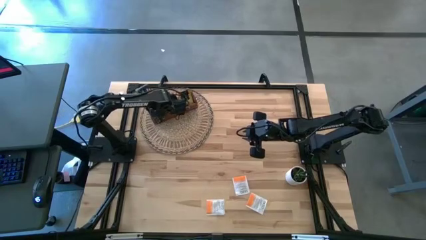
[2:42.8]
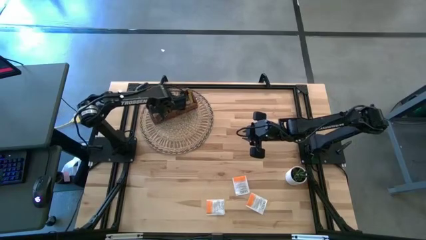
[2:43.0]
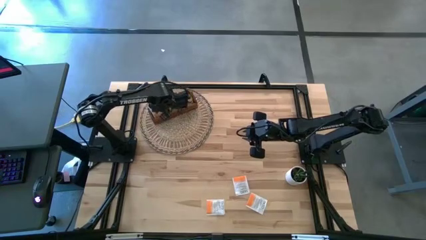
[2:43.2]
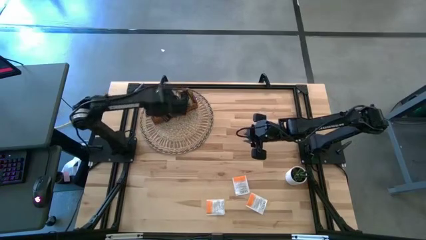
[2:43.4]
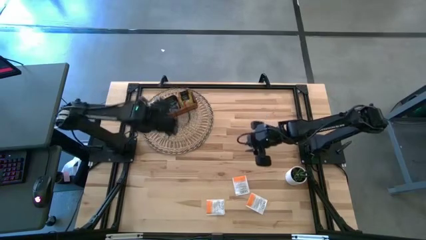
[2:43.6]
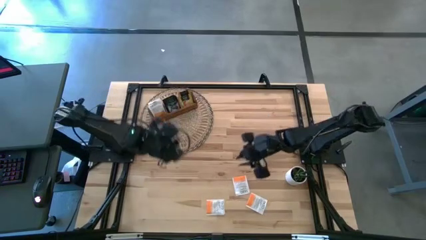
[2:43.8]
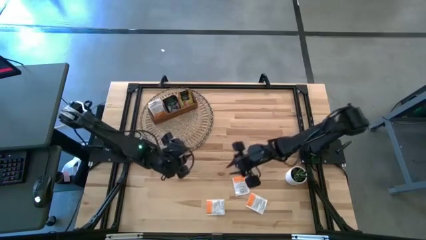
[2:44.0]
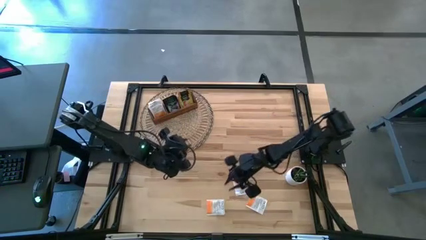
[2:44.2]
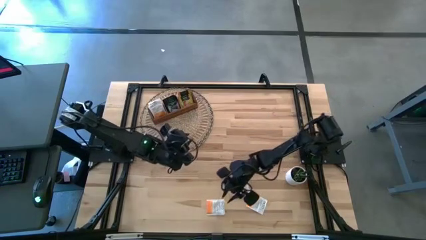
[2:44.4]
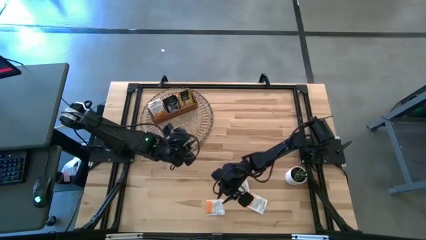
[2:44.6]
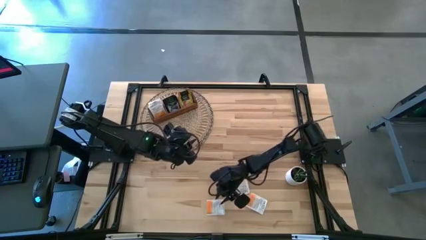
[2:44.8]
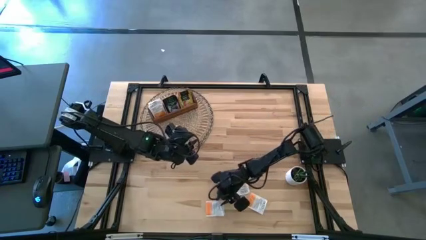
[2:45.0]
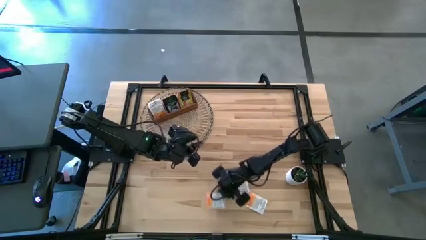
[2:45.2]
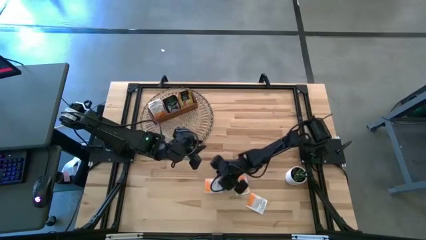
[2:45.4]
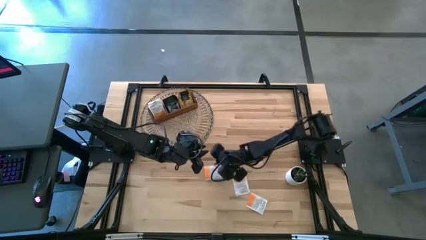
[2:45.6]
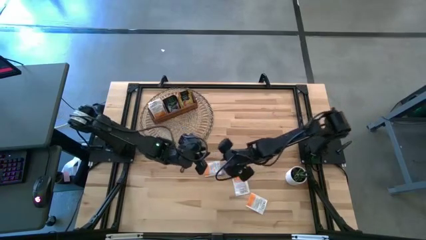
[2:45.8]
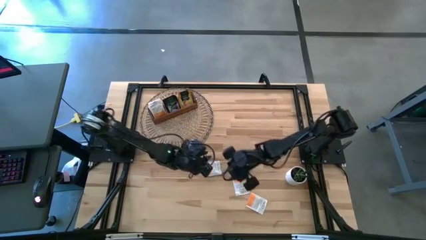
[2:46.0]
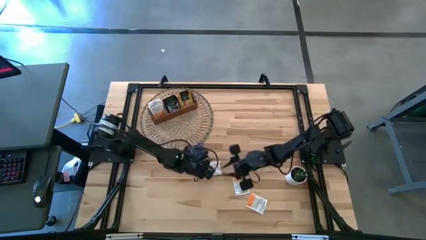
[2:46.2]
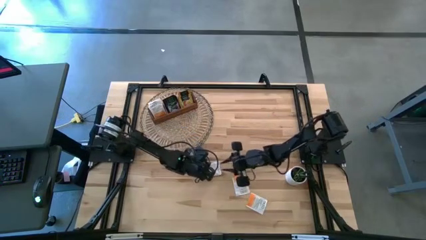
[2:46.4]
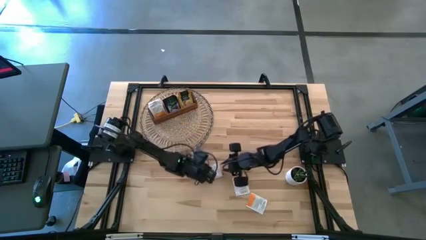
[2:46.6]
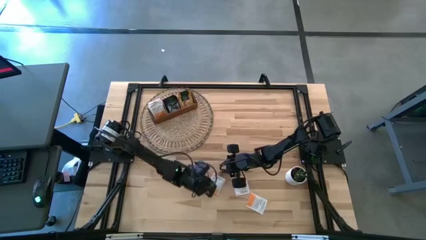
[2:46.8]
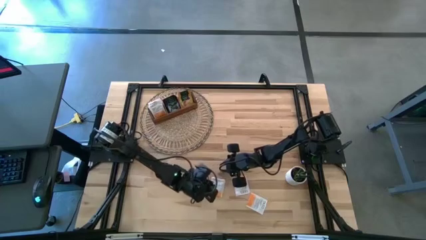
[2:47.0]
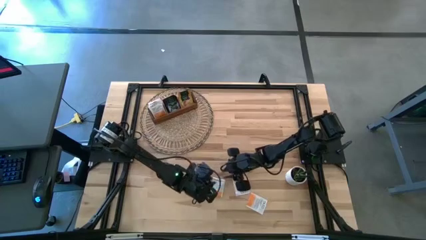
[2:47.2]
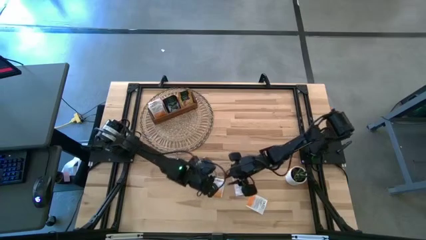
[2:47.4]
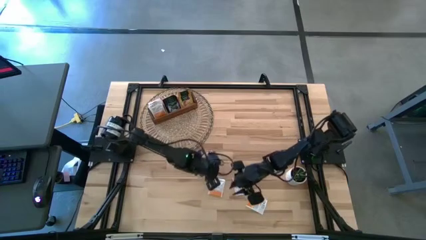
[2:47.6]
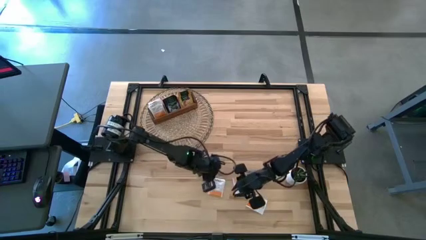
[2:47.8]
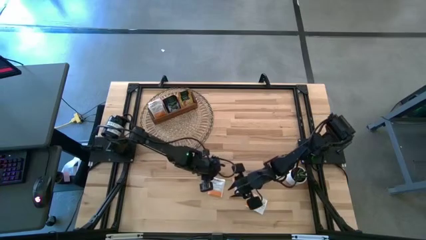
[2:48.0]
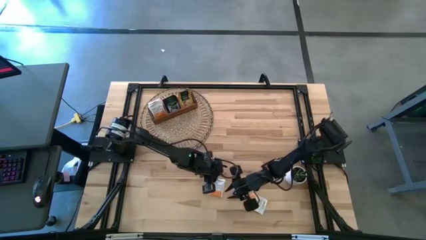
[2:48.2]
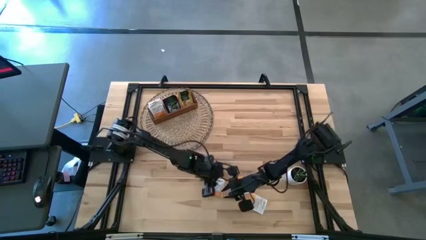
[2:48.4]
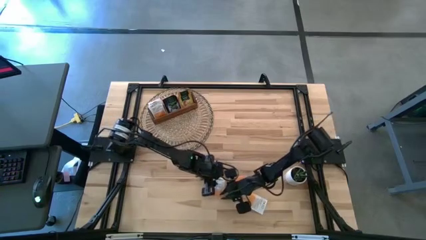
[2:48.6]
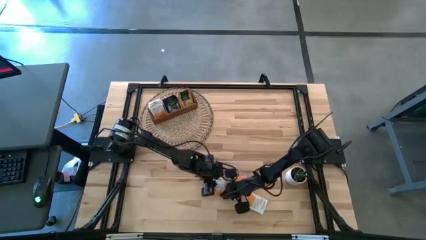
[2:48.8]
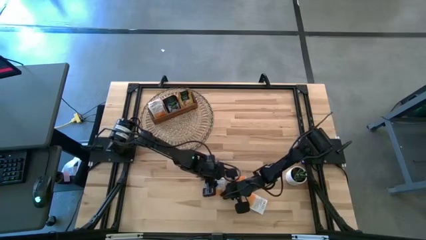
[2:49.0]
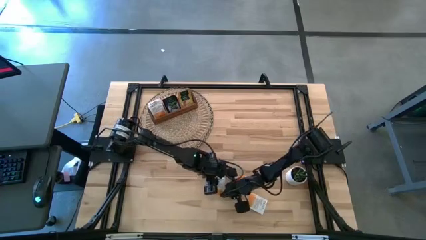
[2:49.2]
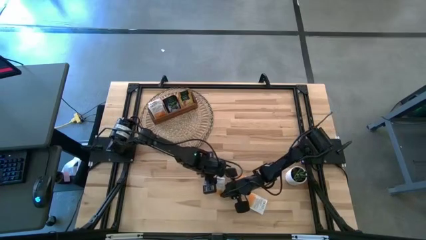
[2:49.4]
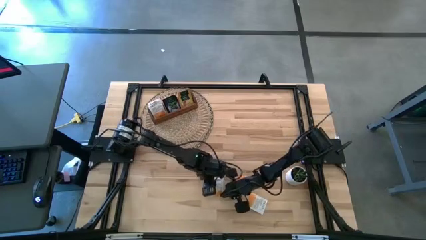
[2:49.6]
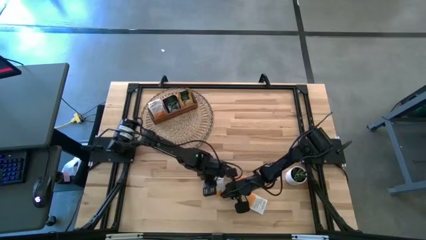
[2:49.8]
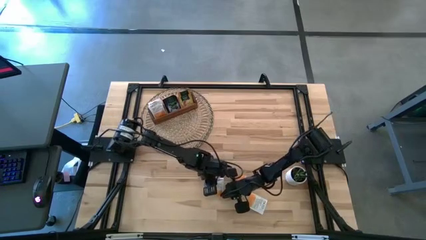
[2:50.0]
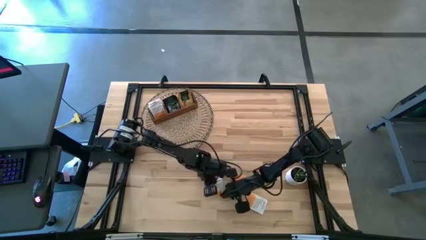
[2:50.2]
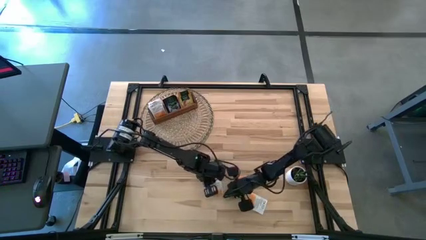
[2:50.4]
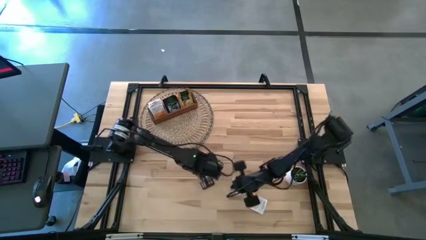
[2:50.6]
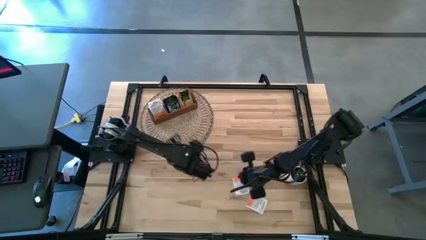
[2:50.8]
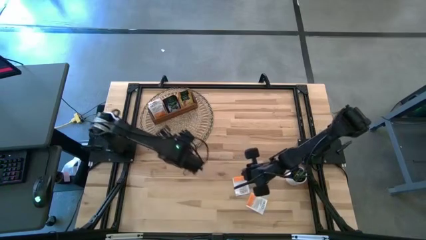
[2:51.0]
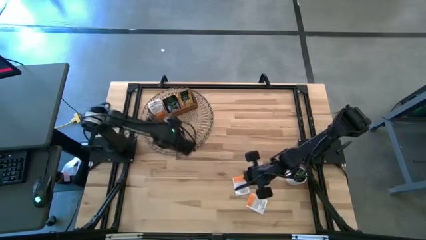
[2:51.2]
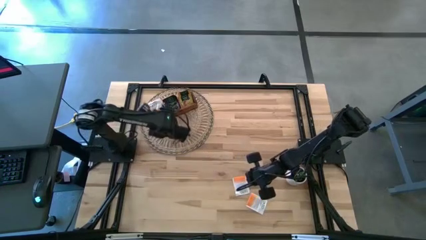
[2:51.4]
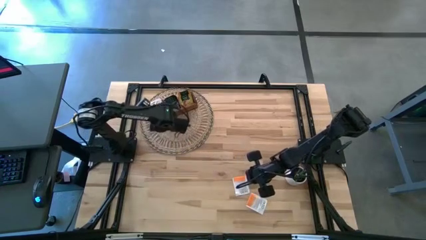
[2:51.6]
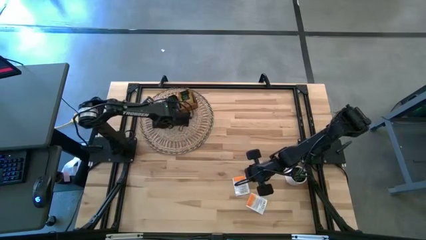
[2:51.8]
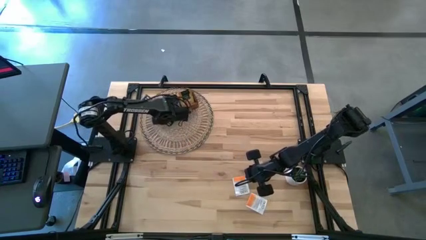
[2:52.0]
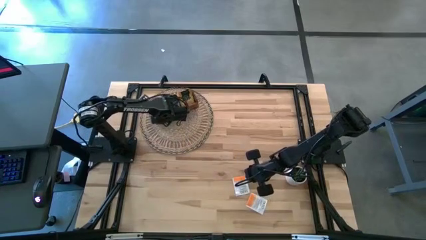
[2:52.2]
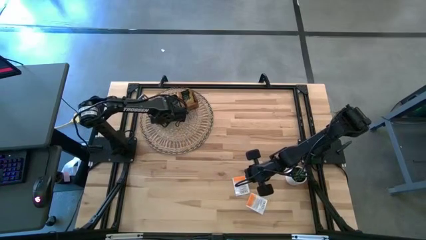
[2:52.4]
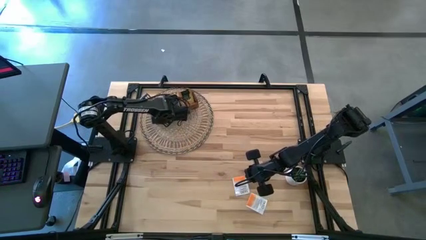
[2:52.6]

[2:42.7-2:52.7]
Task: Pick & Place Tea
Put the orange tea bag into the left section of the wooden organizer

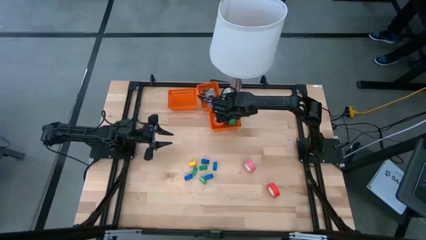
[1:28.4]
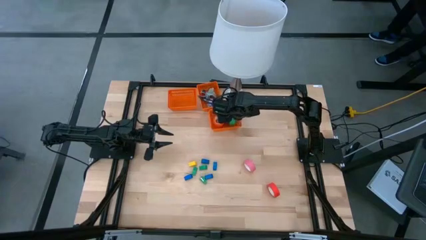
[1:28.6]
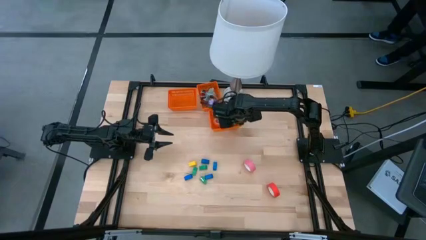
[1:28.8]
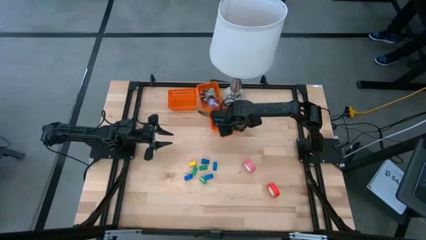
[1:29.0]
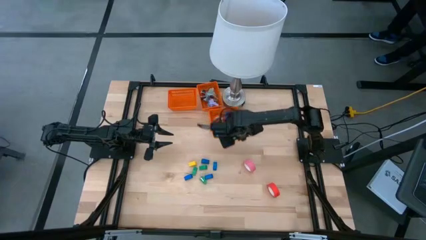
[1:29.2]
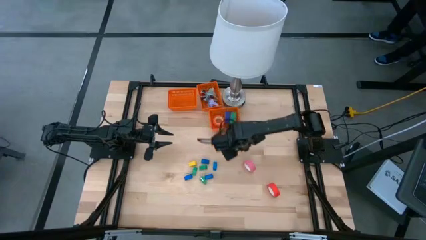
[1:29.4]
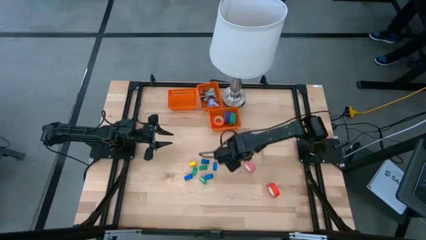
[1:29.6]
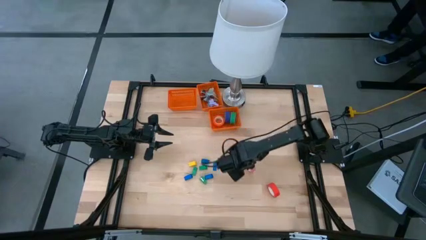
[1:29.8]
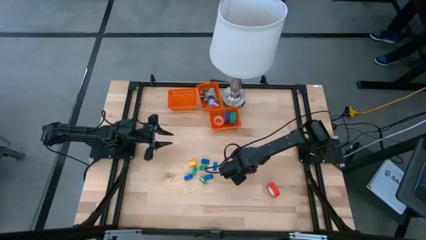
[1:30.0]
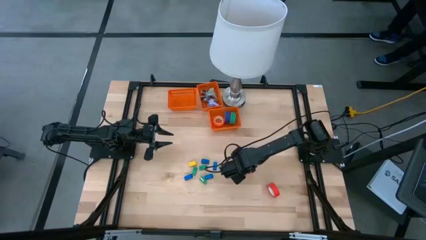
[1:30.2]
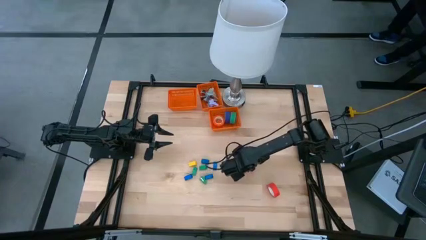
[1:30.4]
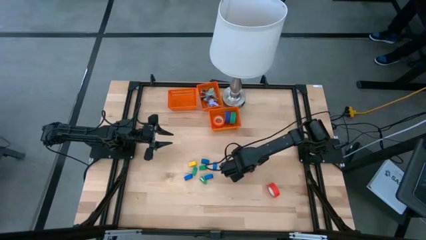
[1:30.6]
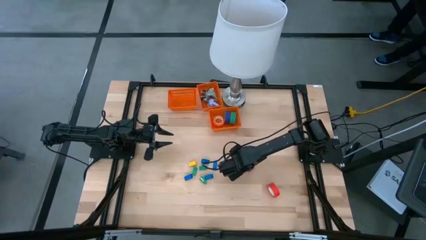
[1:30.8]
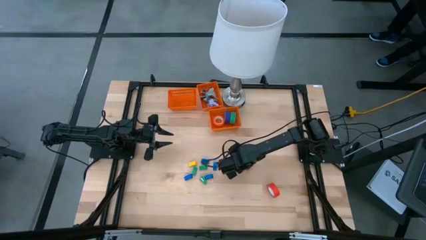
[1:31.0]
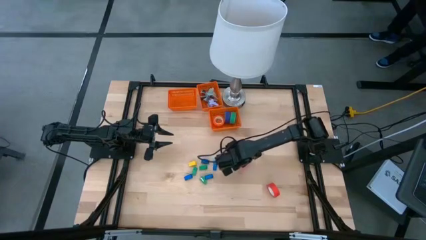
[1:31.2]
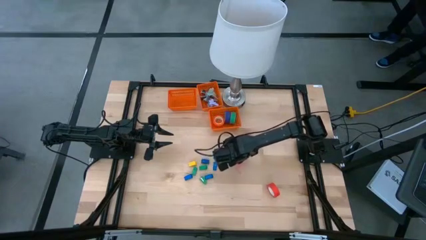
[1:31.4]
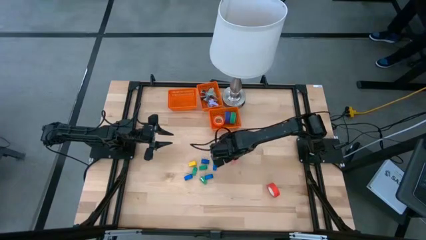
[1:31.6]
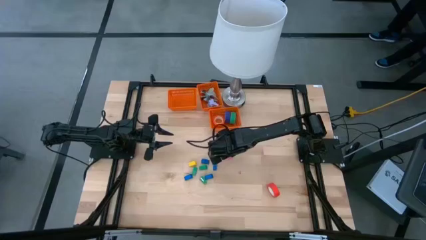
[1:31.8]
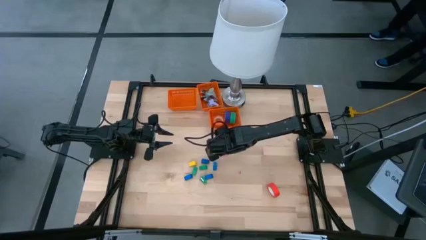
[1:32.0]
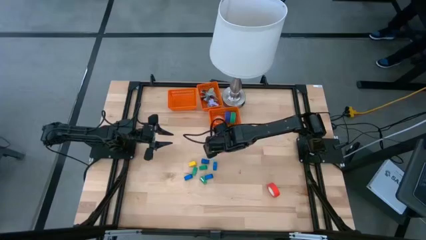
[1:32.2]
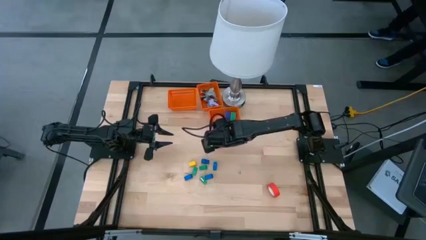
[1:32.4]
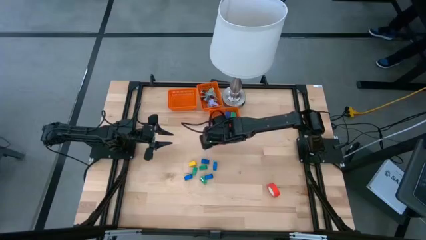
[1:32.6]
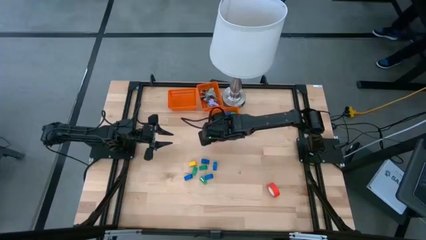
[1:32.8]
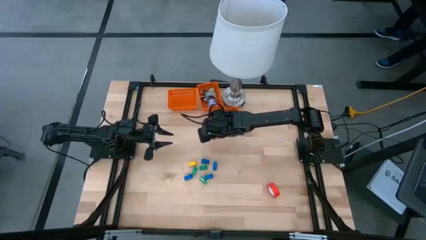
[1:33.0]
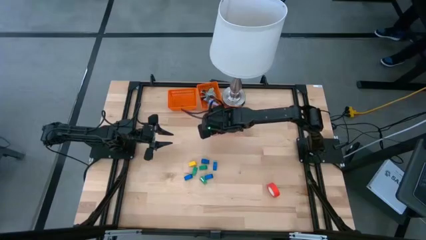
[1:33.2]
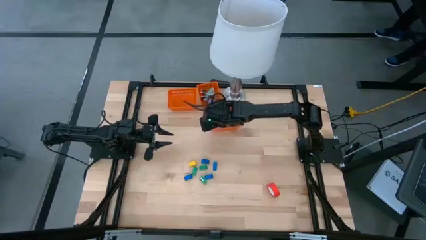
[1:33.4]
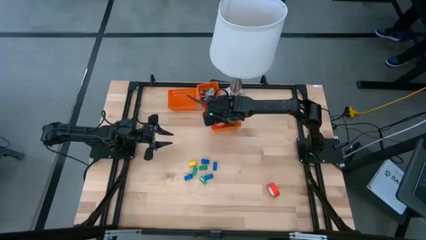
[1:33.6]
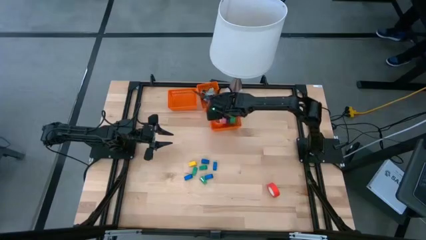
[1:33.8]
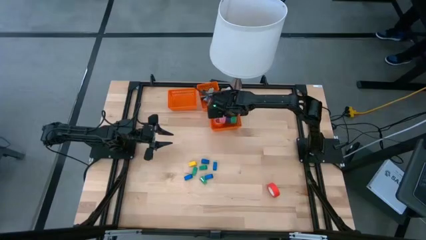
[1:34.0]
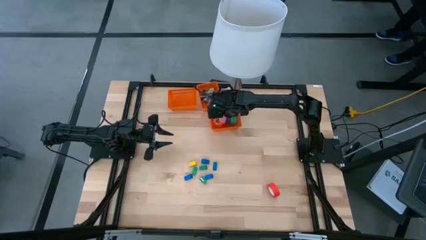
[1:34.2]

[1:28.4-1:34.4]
Task: Pick and place Stapler, Stapler remover, tape
Put the pink tape into the bottom right orange basket
